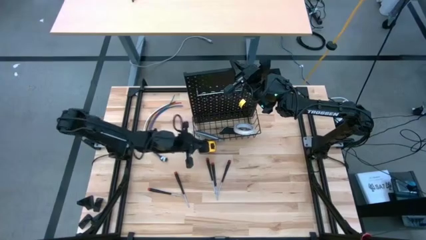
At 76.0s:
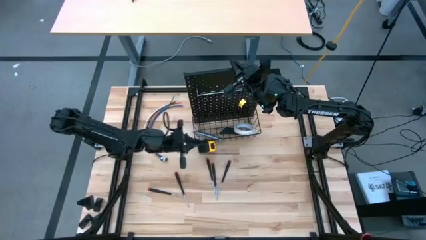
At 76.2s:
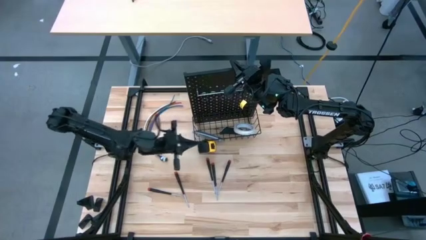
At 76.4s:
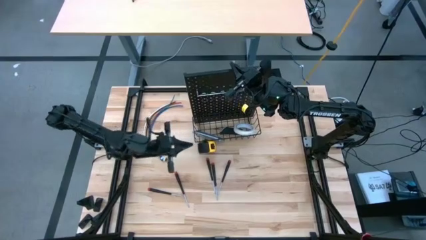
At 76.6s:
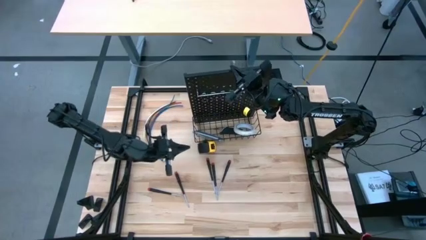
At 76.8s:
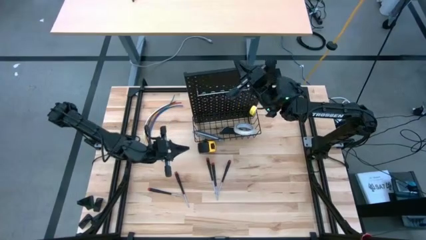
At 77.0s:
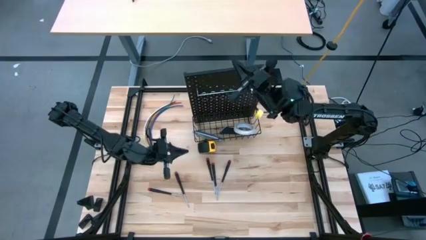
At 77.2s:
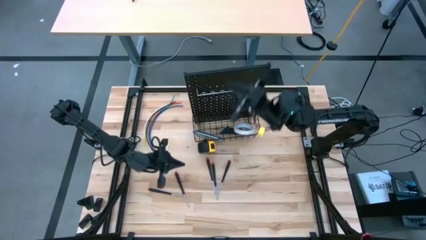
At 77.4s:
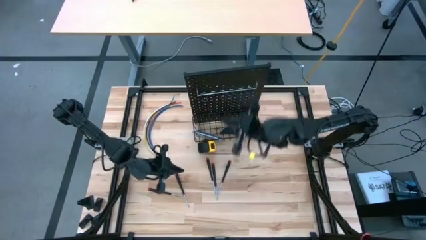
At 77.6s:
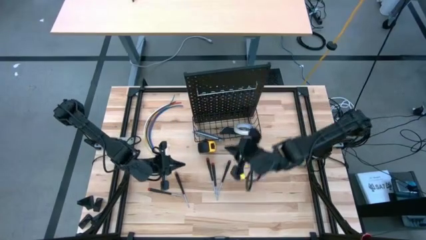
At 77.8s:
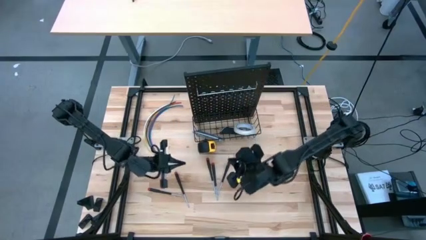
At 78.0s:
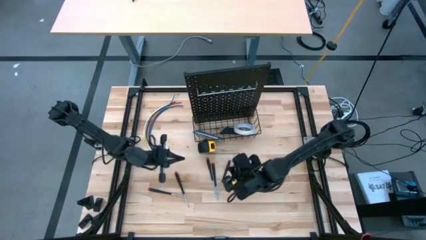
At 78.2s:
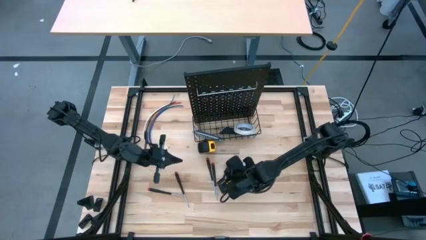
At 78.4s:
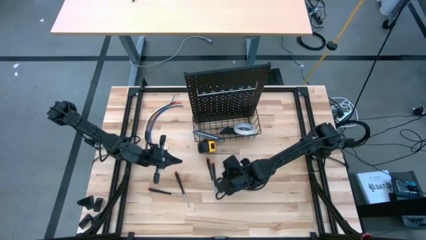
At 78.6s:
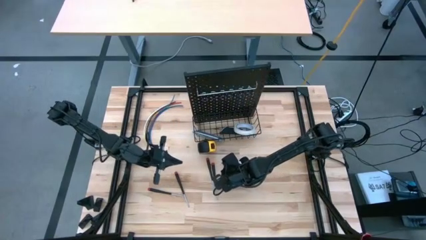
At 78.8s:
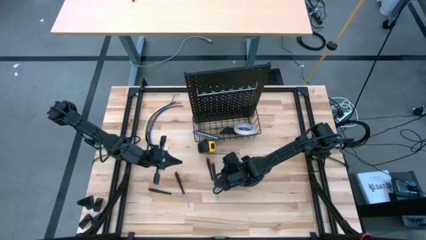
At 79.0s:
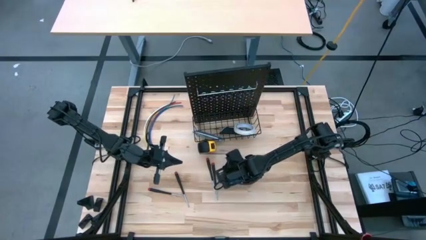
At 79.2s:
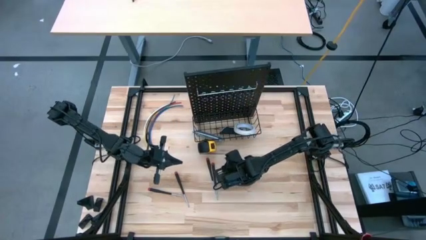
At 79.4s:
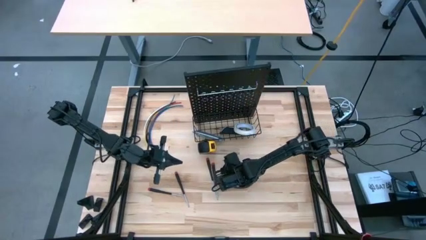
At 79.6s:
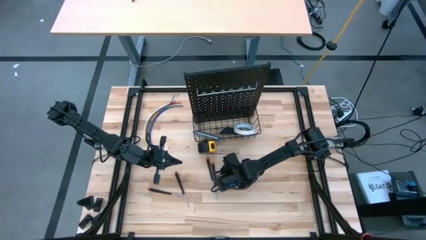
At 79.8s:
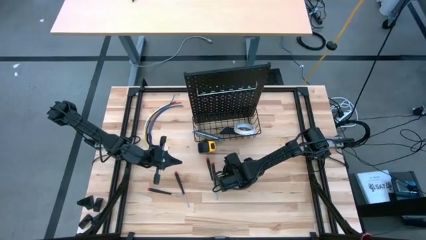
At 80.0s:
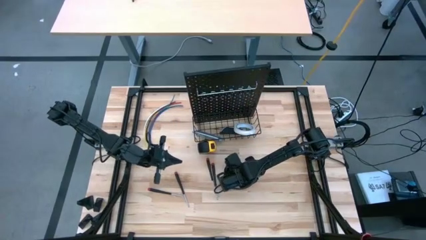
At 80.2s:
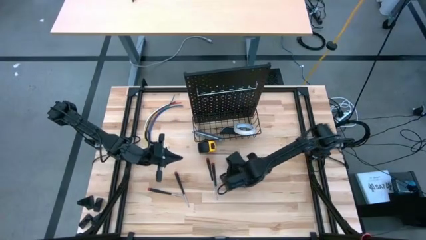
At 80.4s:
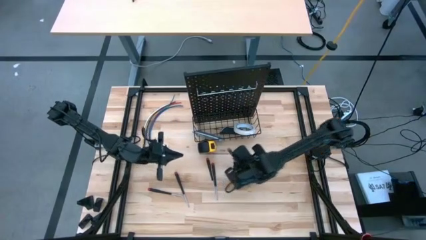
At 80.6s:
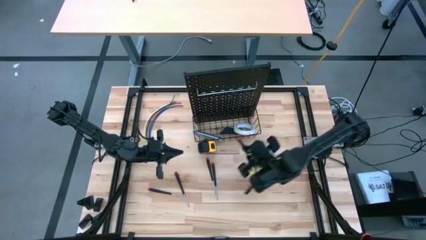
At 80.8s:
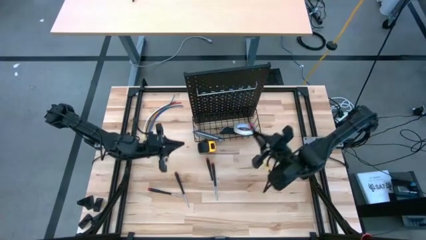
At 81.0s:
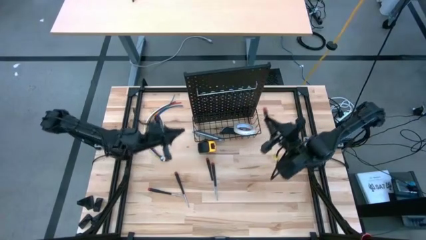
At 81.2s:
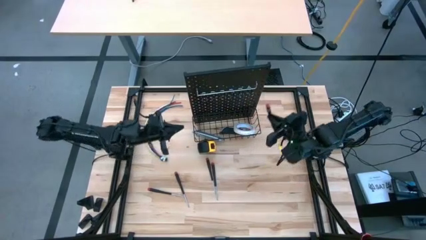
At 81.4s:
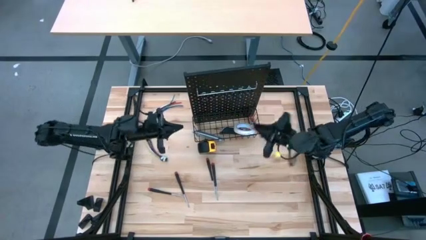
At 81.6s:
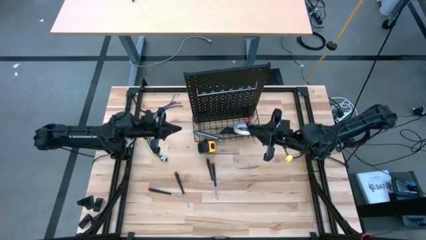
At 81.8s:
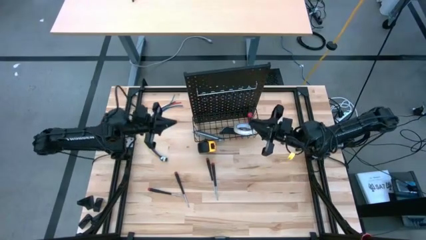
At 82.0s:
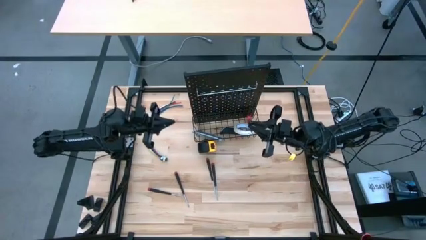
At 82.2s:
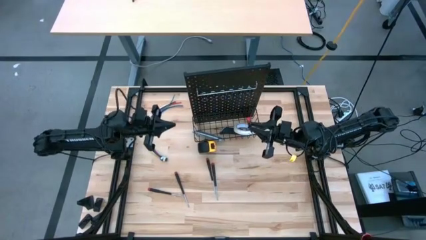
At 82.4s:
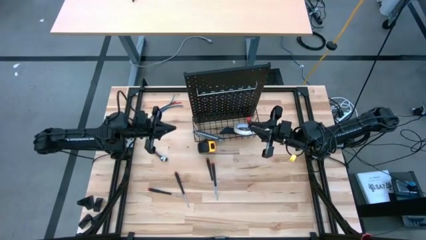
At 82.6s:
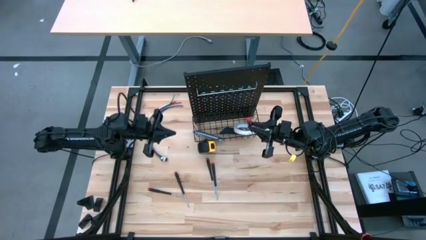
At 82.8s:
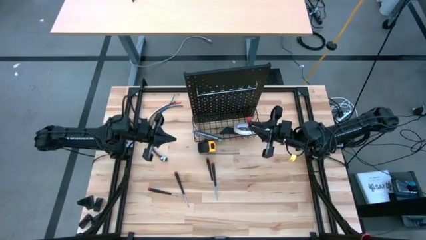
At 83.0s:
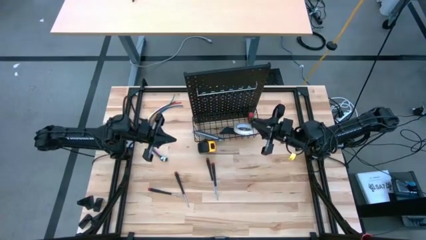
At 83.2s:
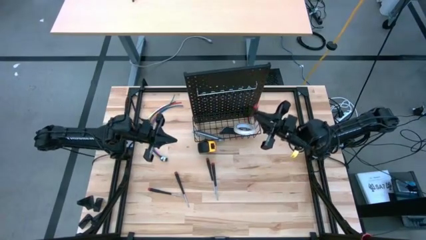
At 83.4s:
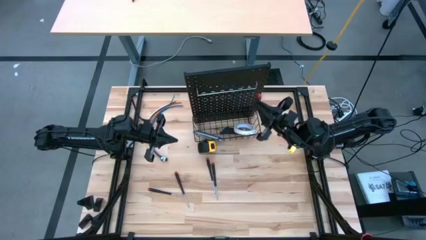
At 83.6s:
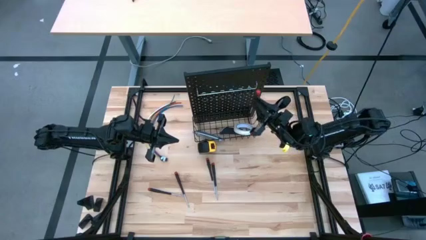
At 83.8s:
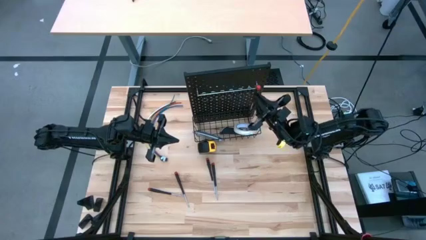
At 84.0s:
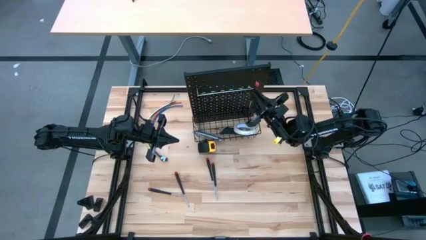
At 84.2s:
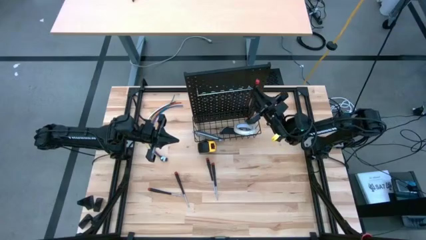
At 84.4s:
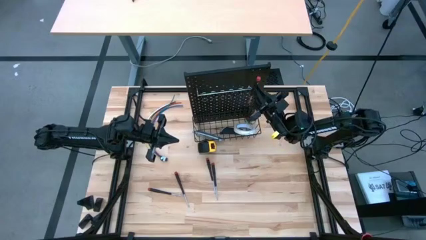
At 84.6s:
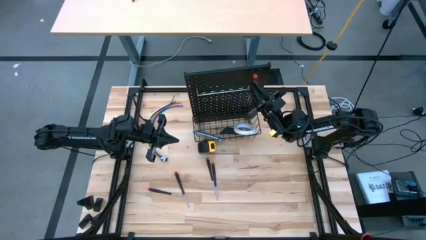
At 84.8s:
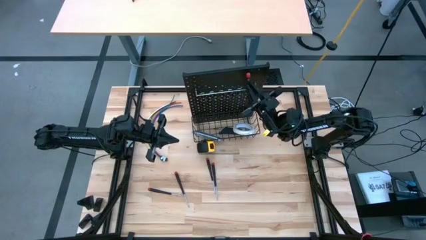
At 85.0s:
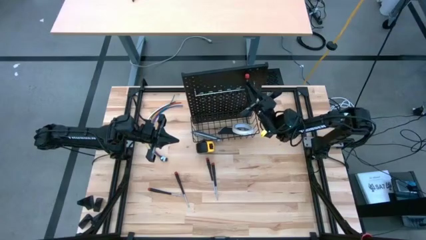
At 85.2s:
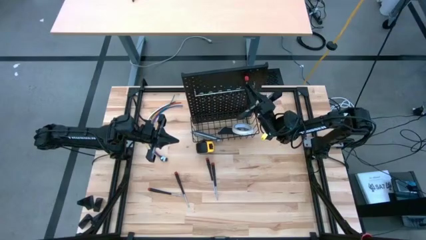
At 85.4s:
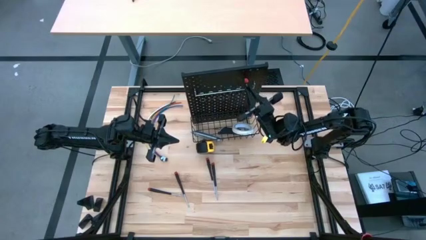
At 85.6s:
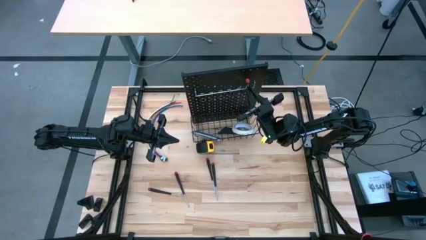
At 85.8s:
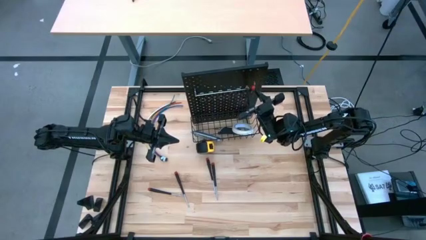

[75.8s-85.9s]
Task: Hang tools onto peg board
Hang the black screwdriver onto the pegboard

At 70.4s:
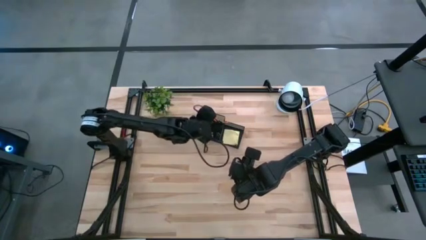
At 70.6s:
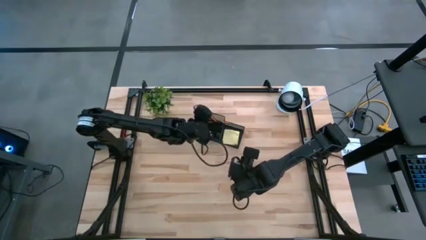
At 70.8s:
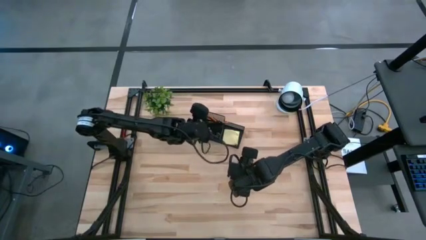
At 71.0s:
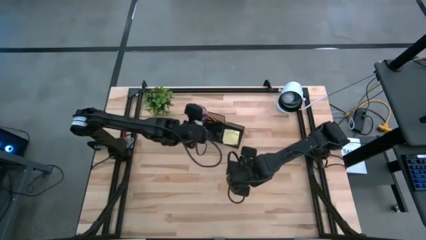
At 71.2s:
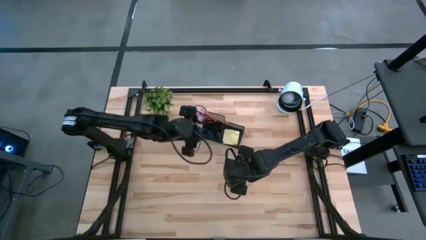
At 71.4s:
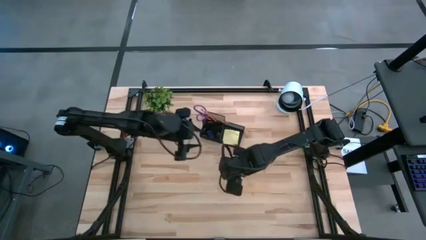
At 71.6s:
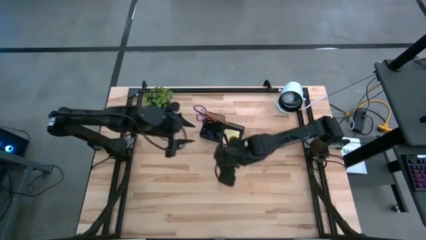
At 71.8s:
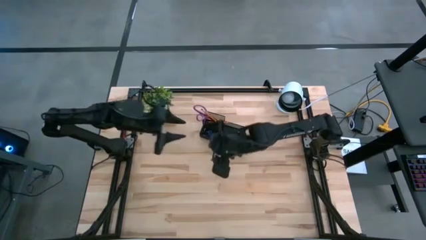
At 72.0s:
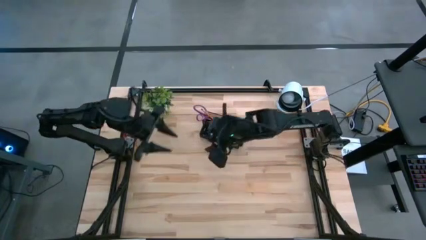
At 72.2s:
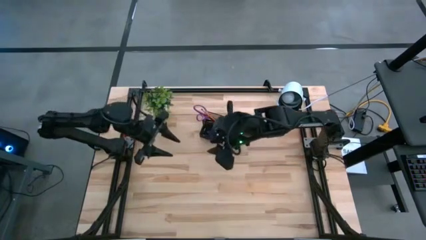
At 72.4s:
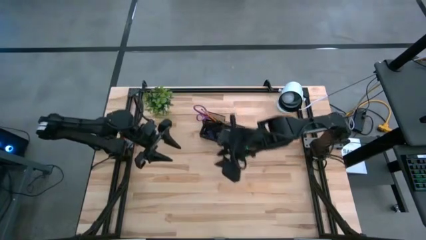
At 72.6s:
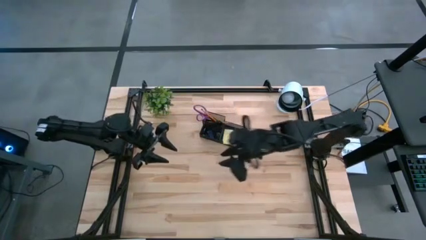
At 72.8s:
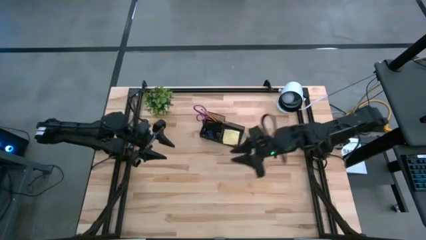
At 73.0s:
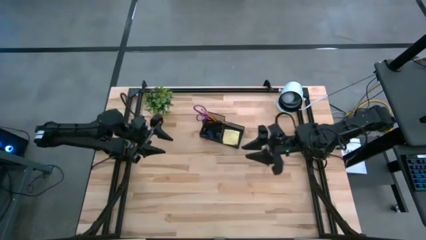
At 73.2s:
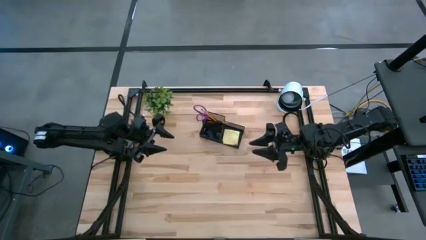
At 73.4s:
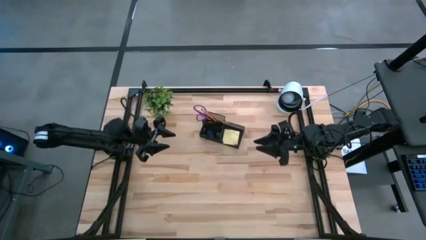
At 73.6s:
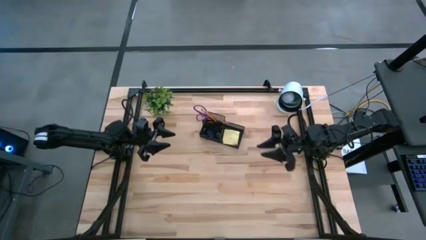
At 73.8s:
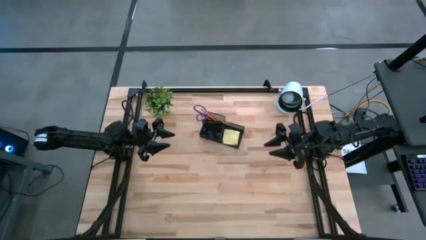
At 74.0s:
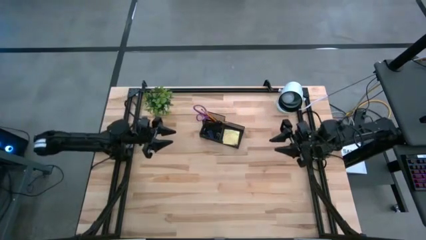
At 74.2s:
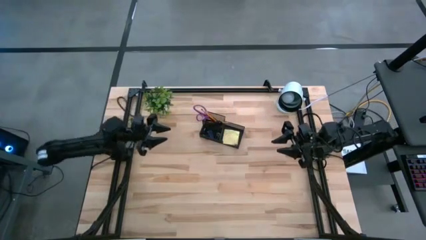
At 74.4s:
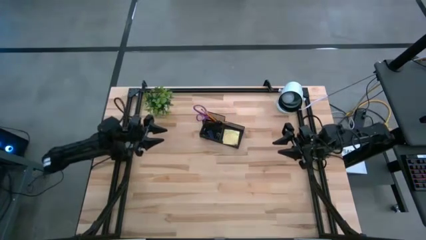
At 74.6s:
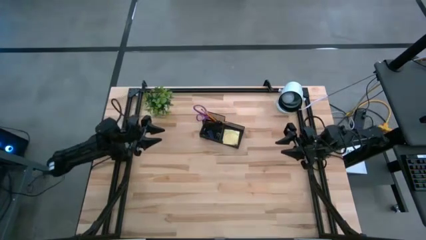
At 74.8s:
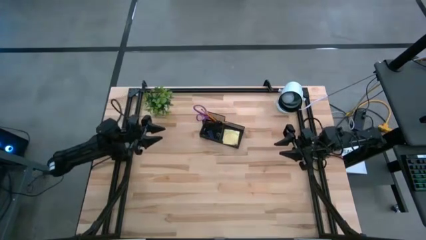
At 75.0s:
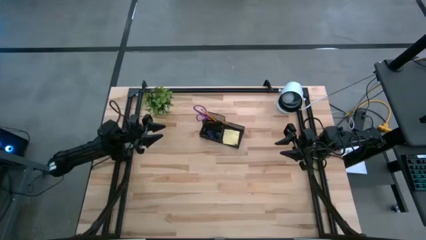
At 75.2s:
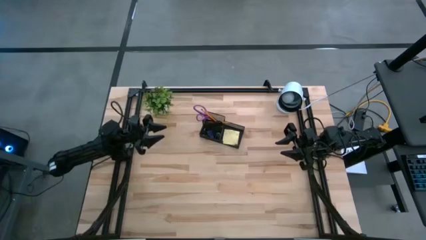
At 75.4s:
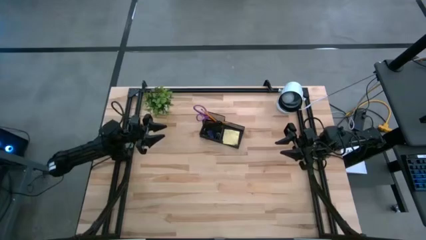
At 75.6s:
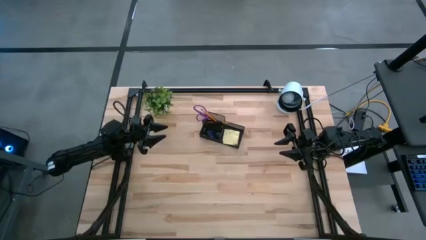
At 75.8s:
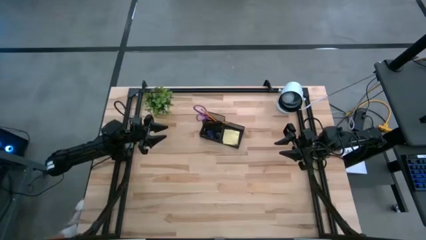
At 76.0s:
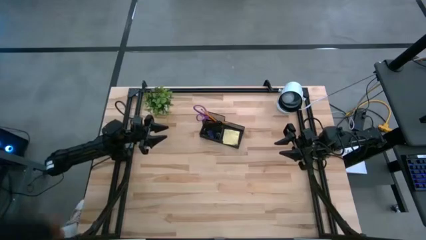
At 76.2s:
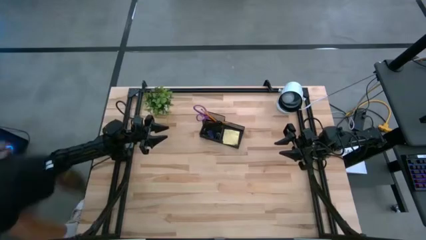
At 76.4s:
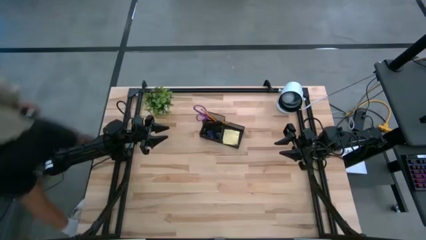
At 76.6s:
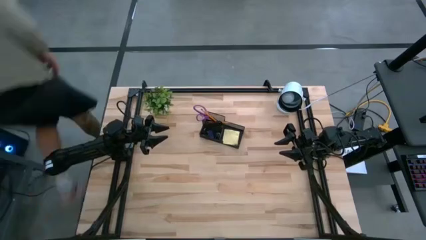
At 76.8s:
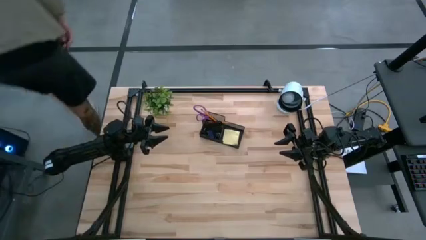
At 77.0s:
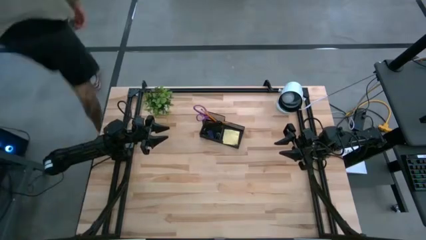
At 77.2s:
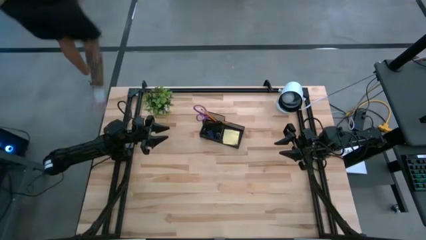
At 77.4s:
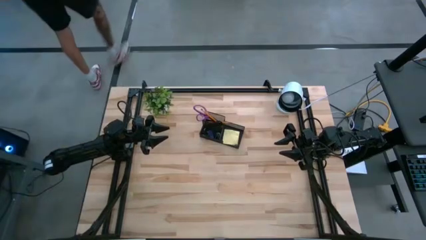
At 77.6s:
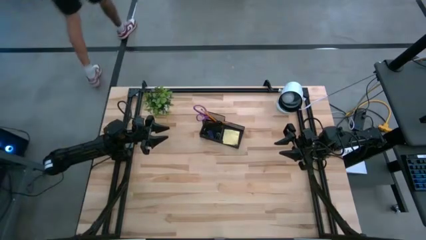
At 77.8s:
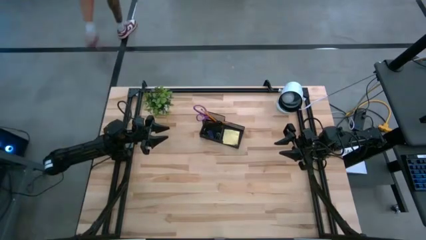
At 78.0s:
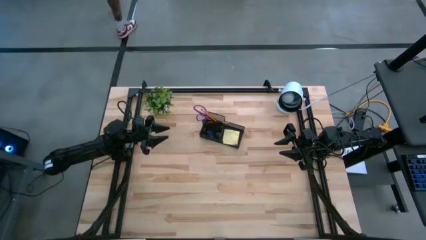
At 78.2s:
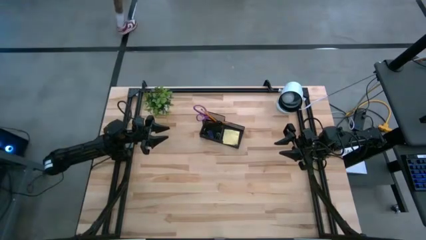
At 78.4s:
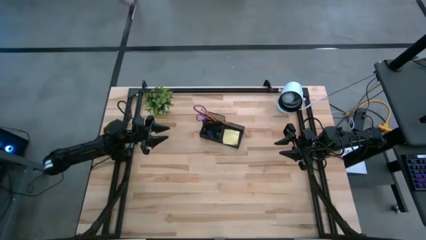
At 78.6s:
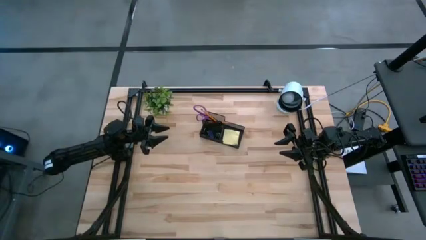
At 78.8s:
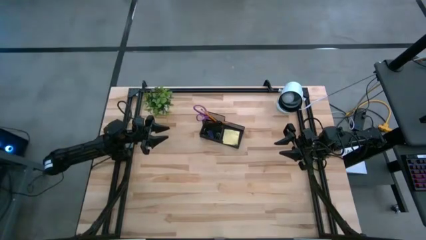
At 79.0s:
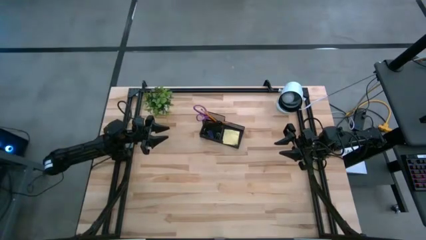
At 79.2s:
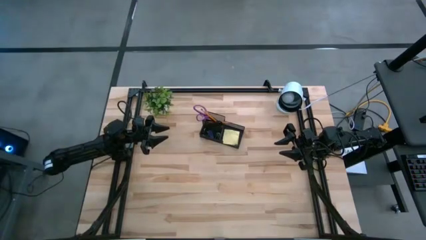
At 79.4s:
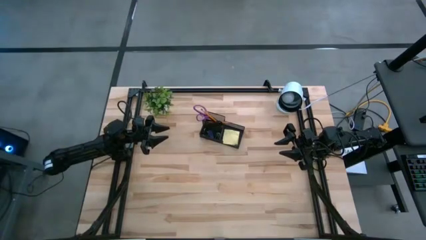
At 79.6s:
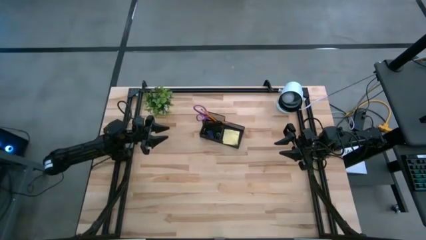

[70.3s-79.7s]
Task: Pick and place office supplies into organizer
Return to Home Position
